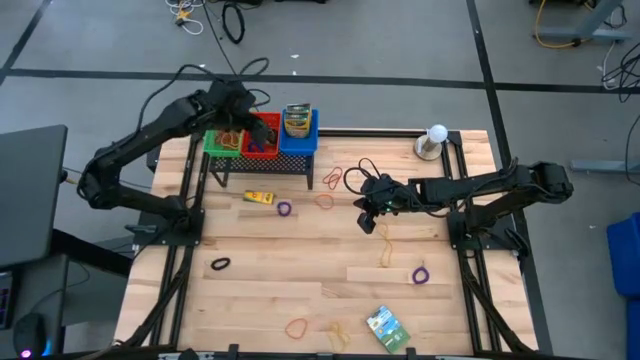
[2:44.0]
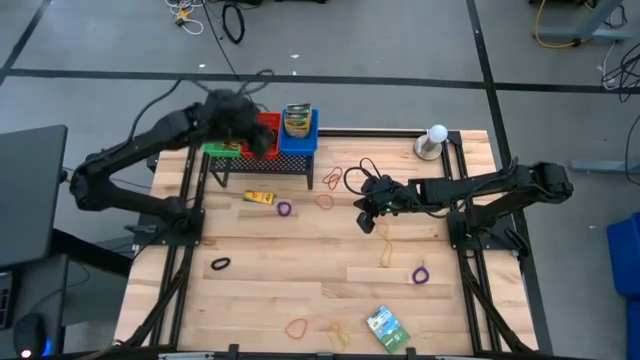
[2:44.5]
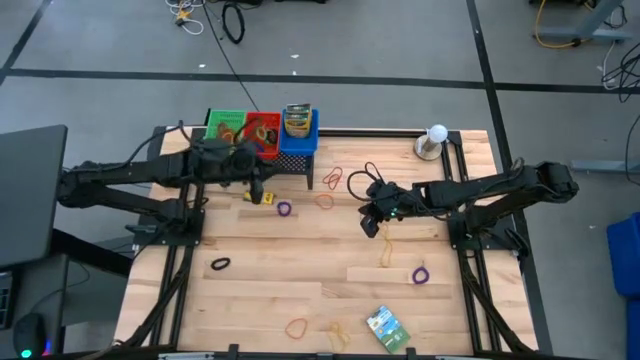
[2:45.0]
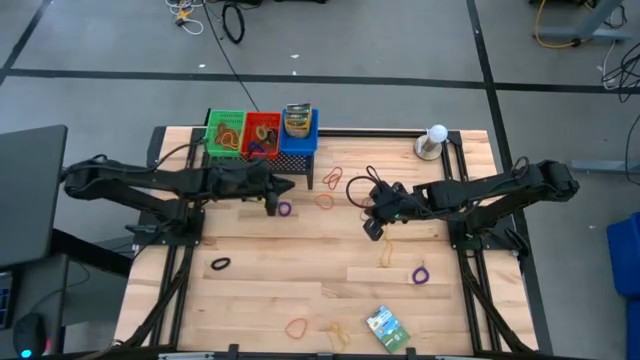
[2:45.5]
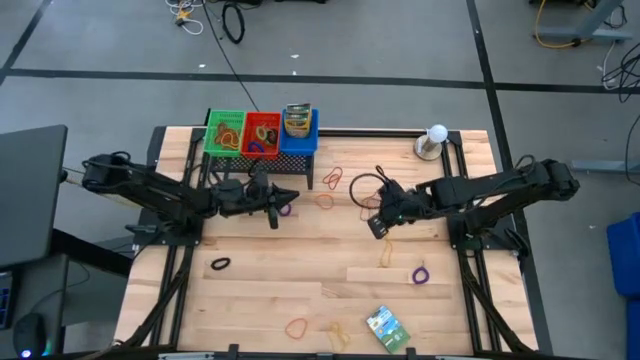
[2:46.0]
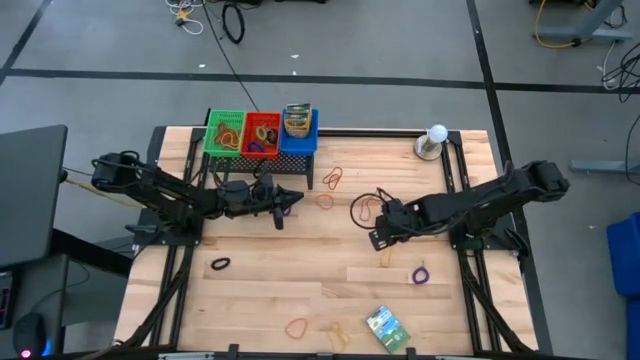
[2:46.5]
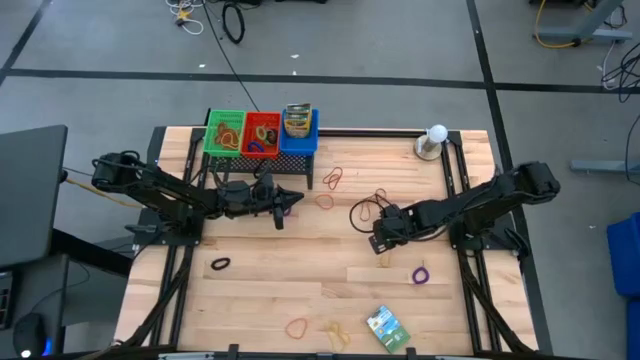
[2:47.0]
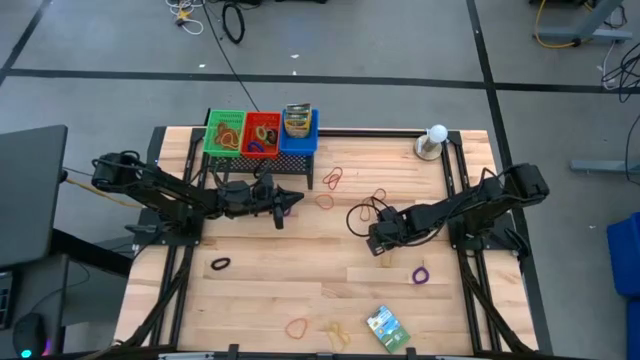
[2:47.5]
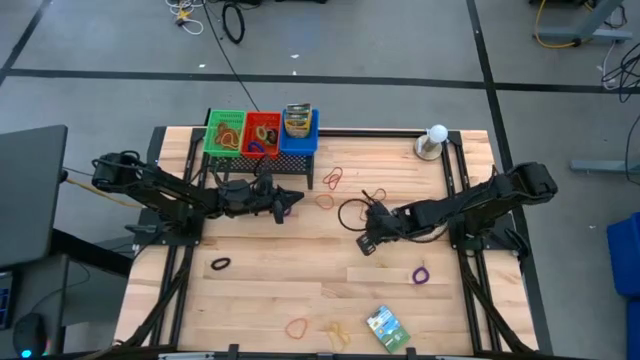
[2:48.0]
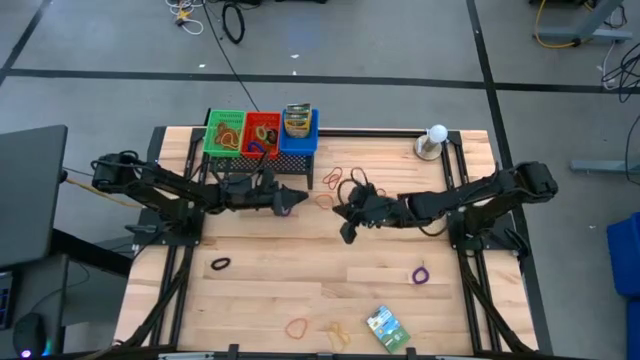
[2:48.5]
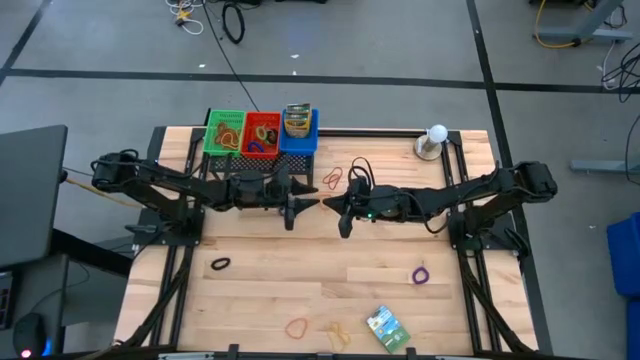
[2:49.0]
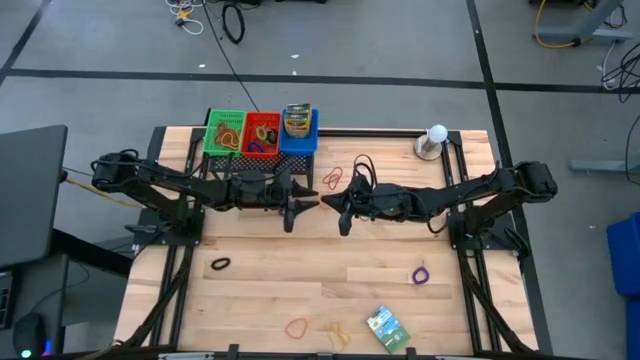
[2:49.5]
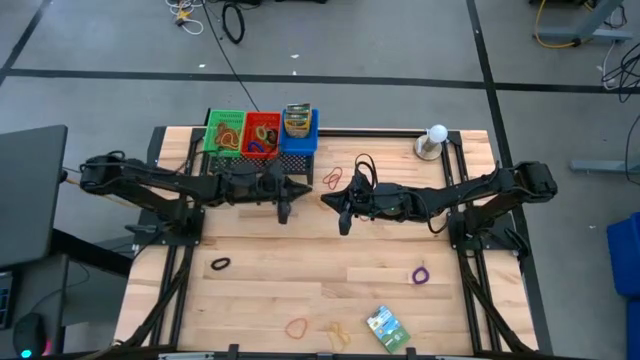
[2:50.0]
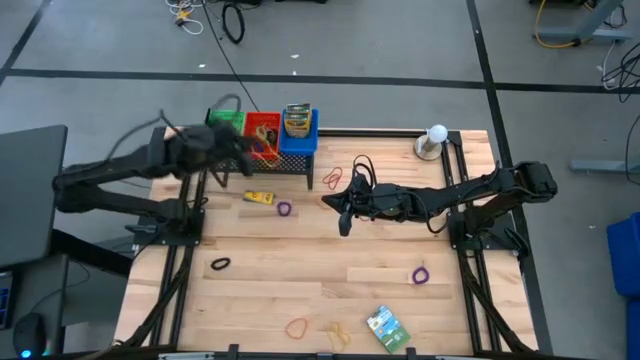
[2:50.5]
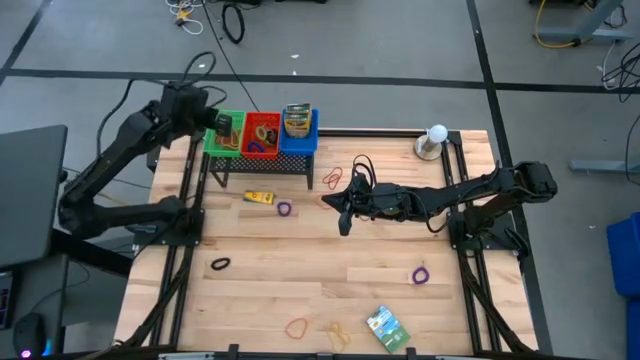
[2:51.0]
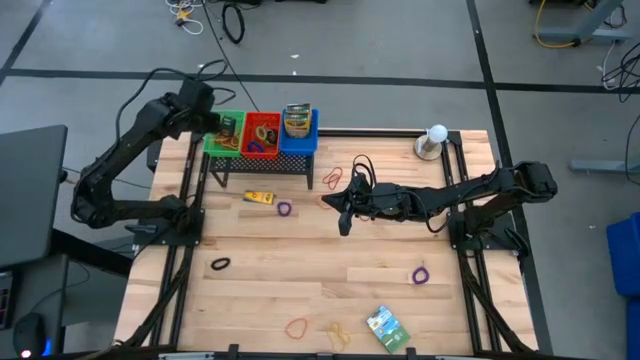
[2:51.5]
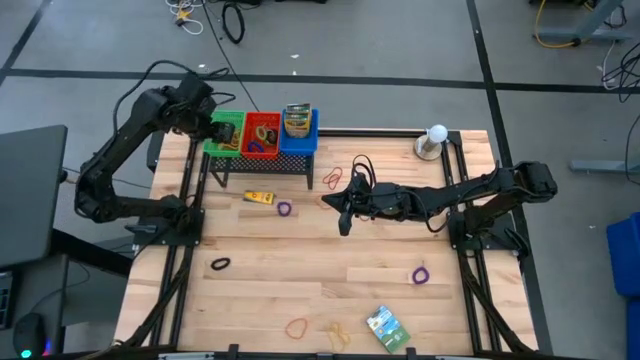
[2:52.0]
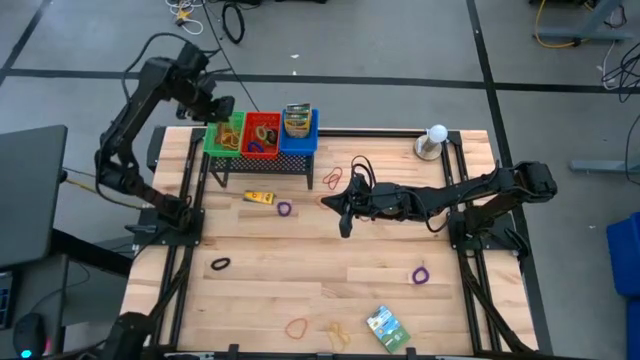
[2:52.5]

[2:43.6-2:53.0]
Task: Pick & Place Office Desk Supplies
Put the yellow rubber band into the green bin on the shelf

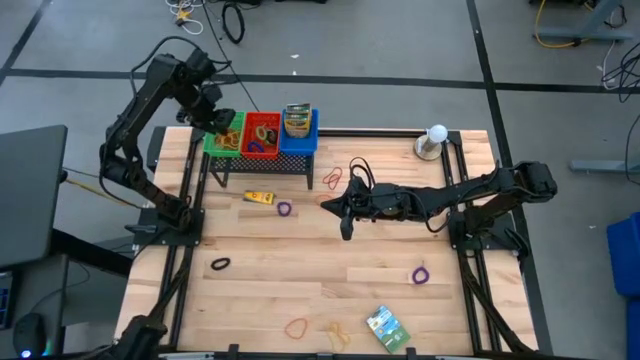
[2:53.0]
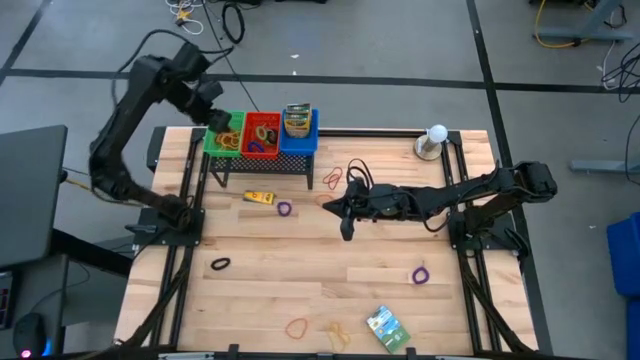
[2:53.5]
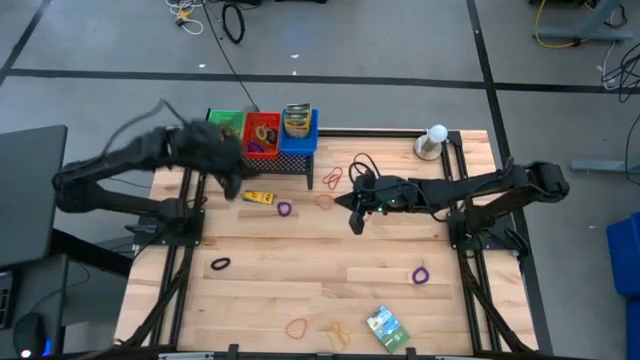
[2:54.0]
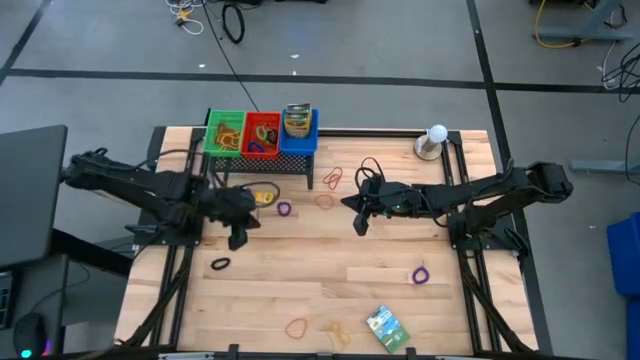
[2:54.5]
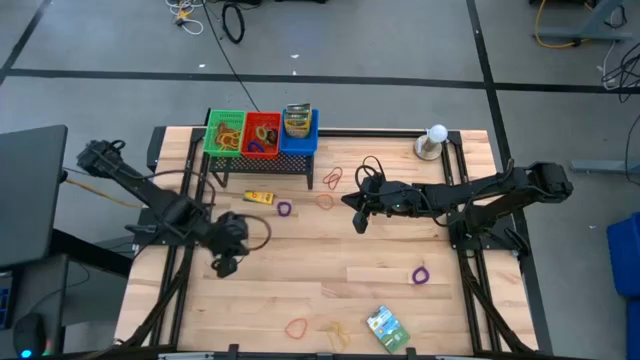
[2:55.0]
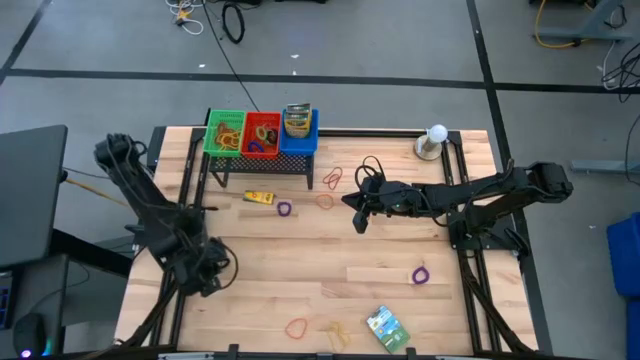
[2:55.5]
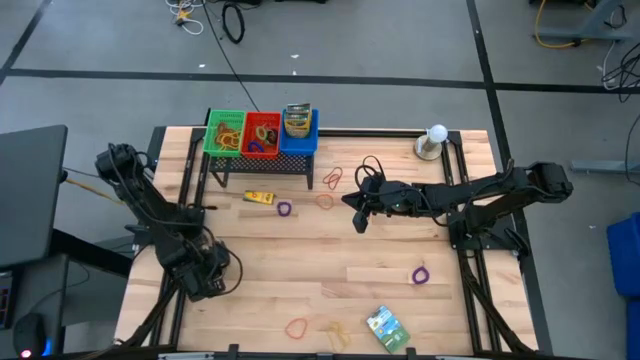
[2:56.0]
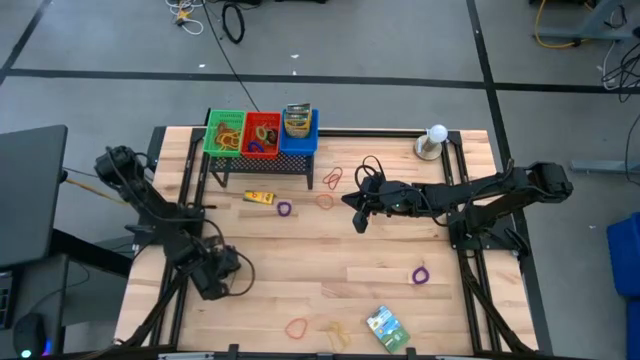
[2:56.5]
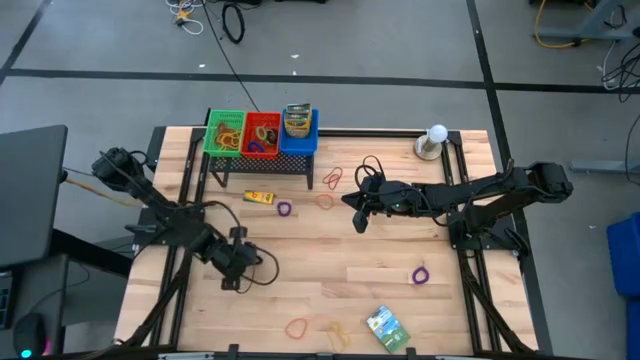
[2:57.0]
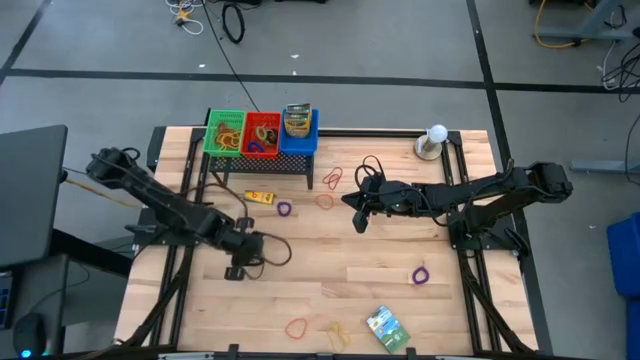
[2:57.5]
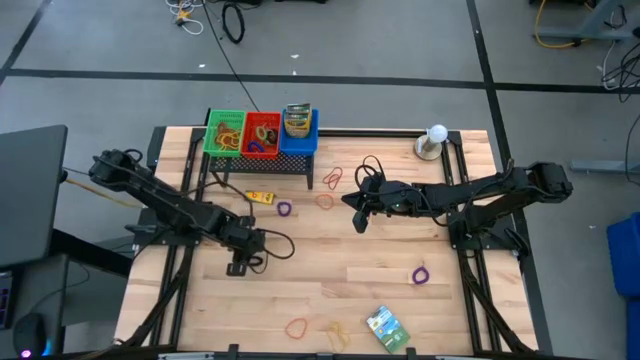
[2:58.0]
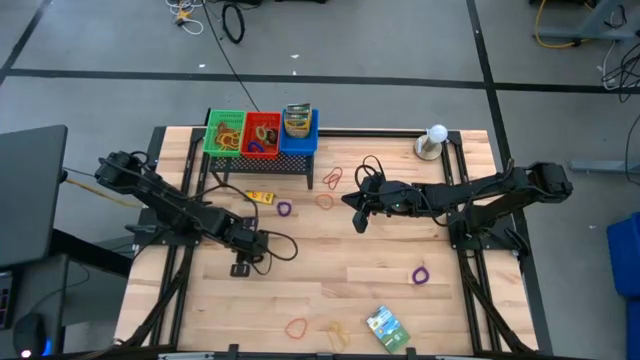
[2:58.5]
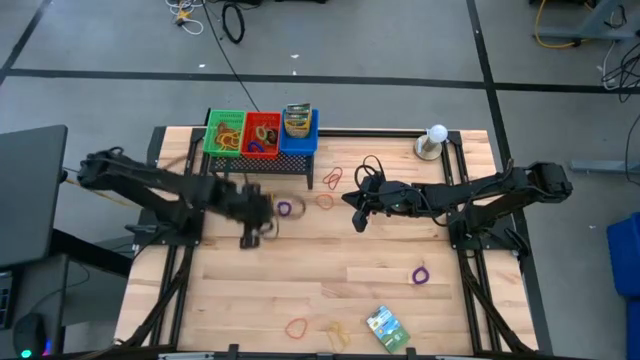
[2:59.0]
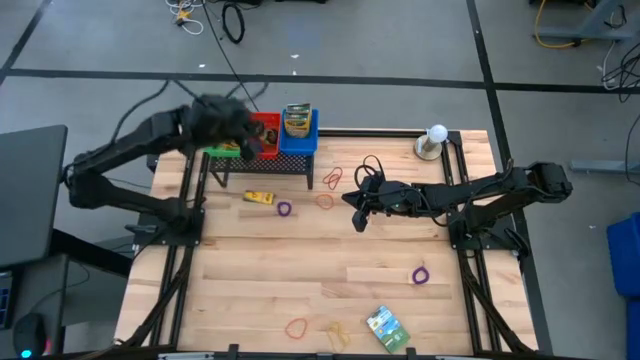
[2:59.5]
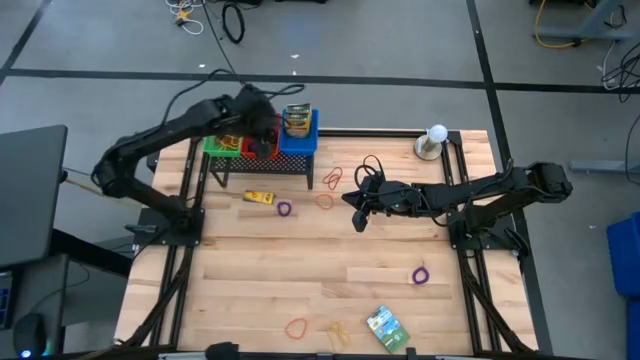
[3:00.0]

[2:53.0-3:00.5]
Put the black spring rubber band into the red bin on the shelf

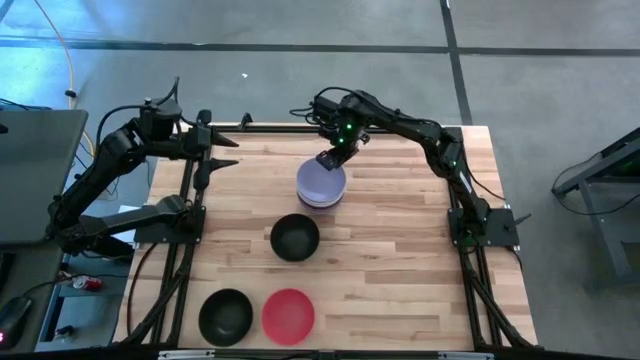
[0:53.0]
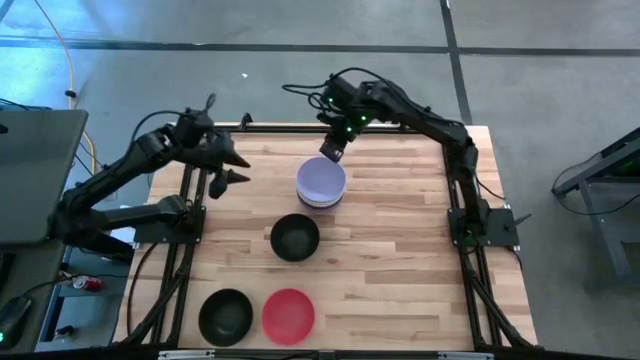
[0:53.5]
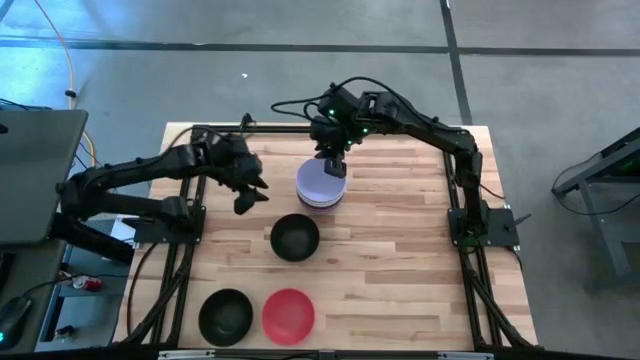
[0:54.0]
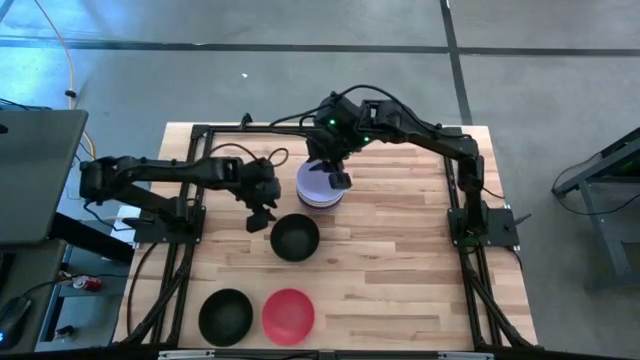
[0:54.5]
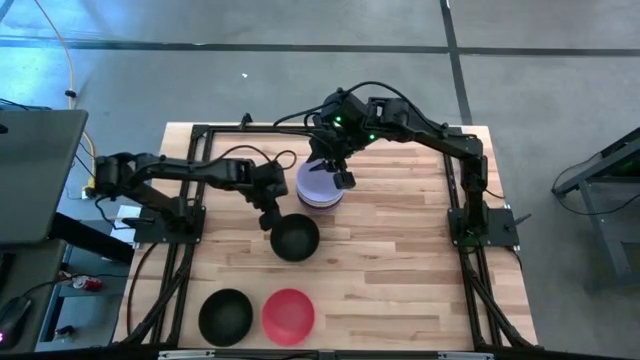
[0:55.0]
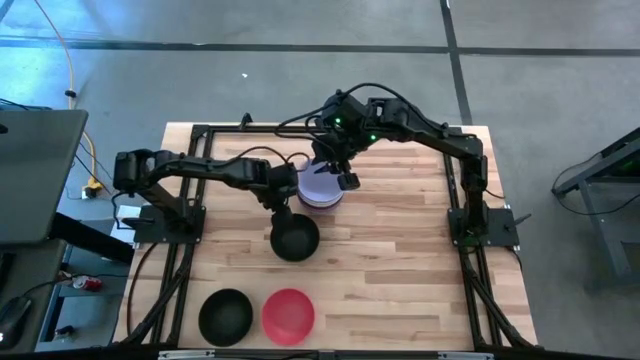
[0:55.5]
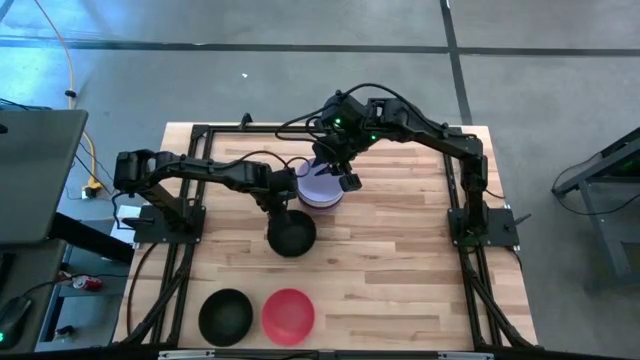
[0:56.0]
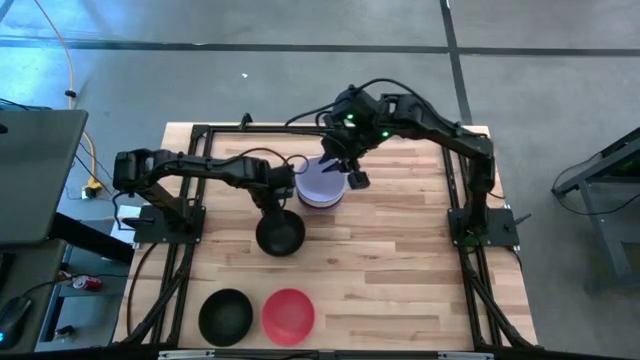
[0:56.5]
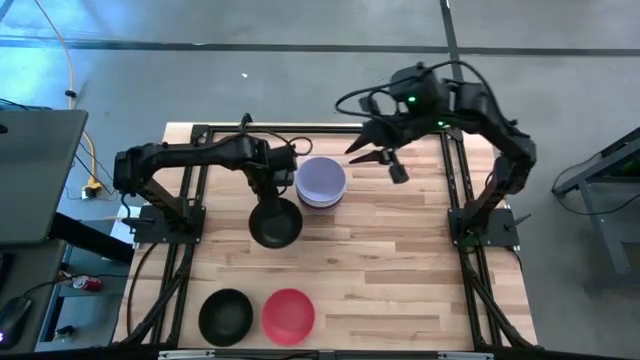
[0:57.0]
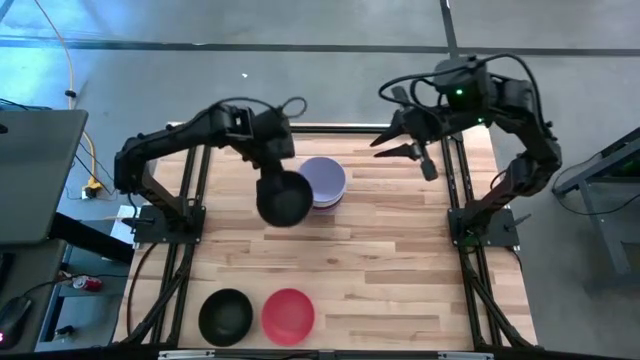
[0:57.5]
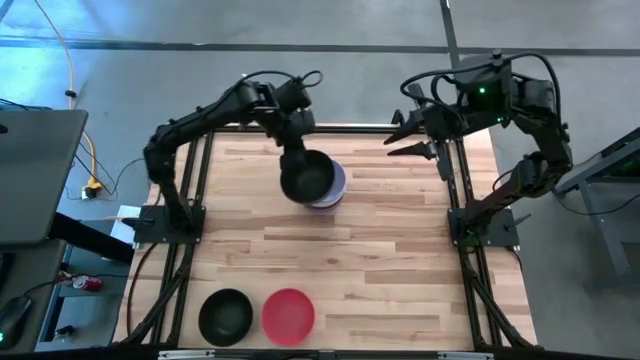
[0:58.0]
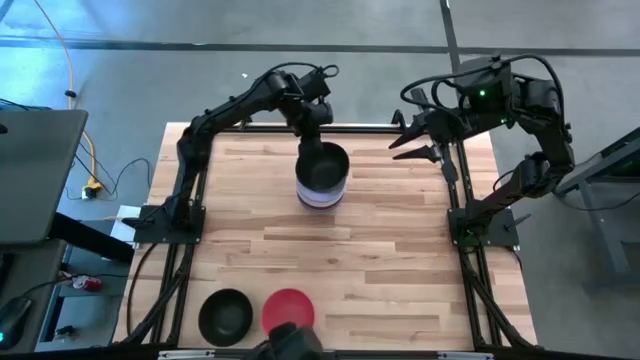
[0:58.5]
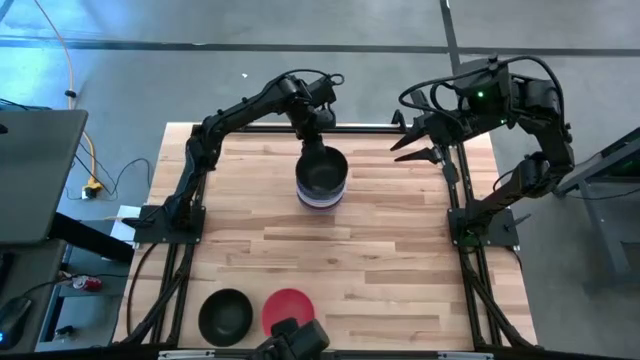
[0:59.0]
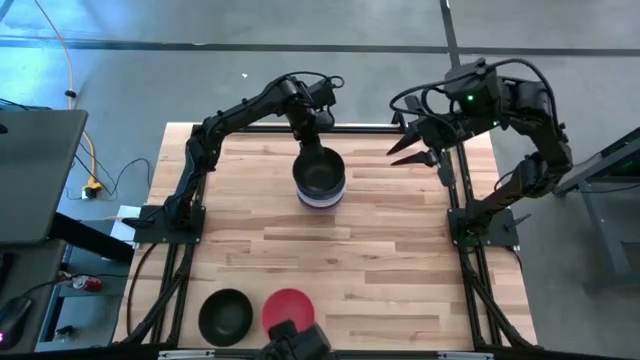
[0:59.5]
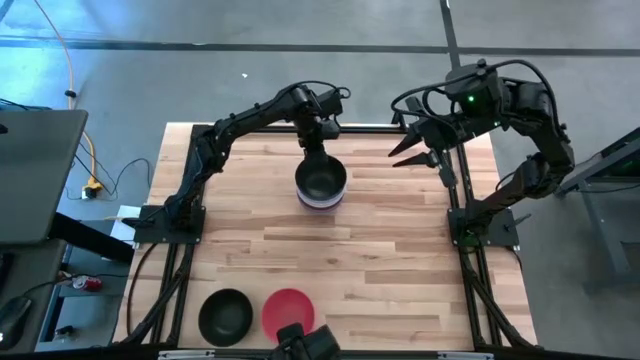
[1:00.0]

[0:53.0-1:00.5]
Task: Nest bowls inside each other
Stack the top black bowl on top of the violet bowl
